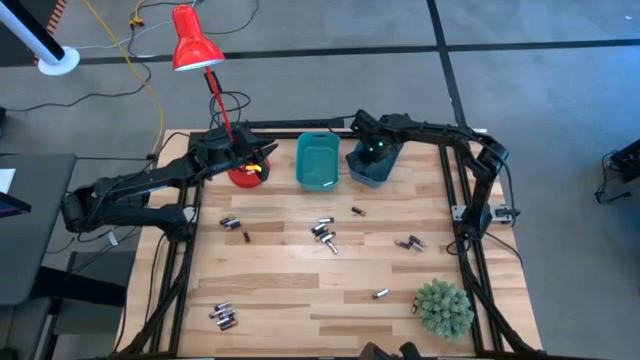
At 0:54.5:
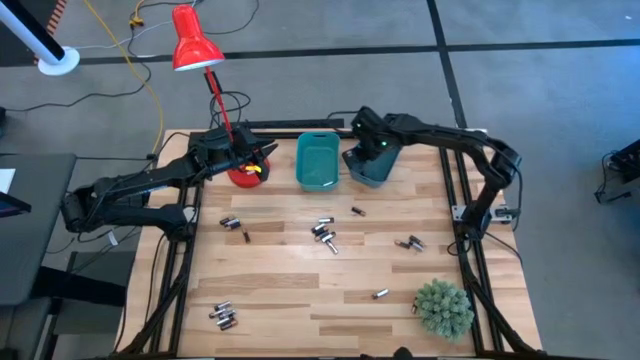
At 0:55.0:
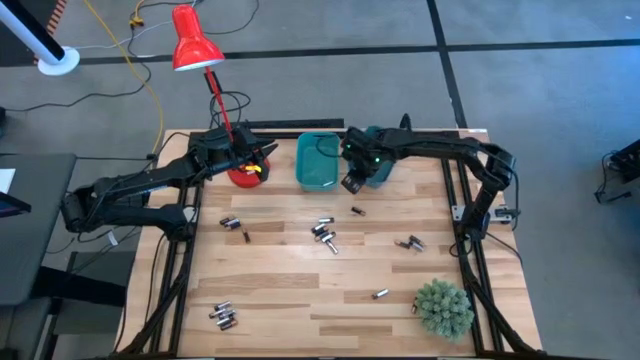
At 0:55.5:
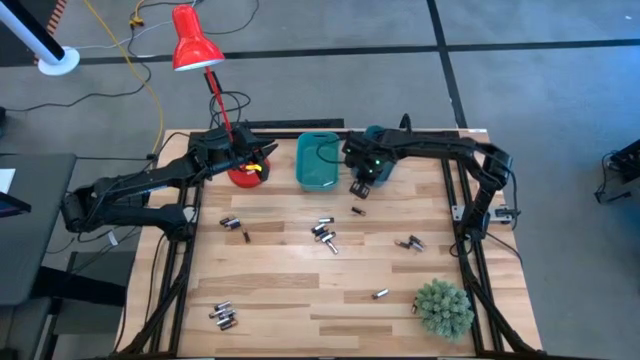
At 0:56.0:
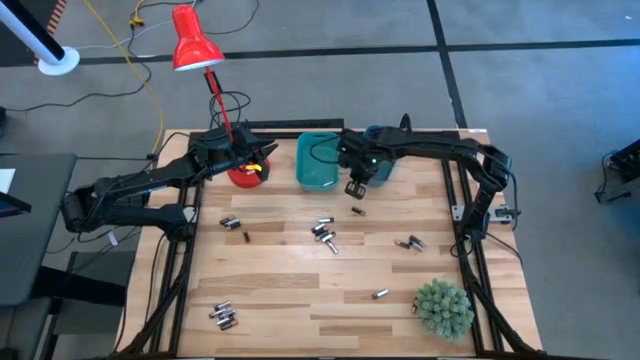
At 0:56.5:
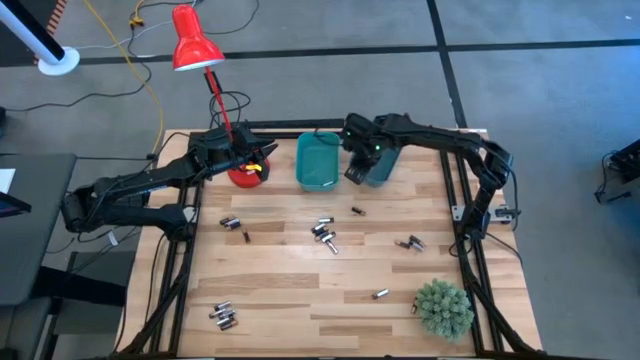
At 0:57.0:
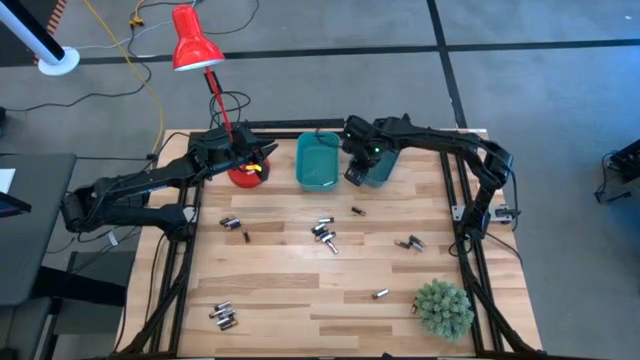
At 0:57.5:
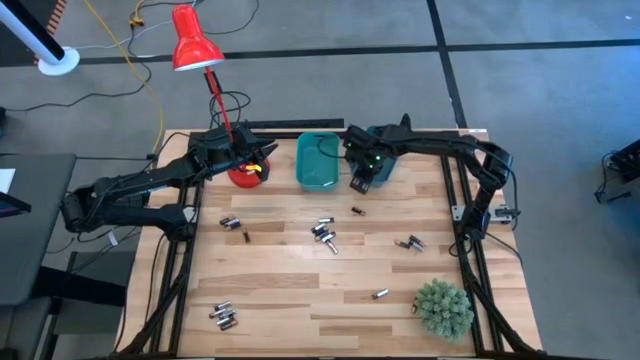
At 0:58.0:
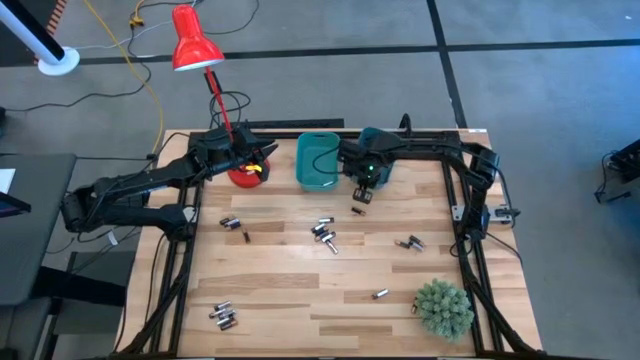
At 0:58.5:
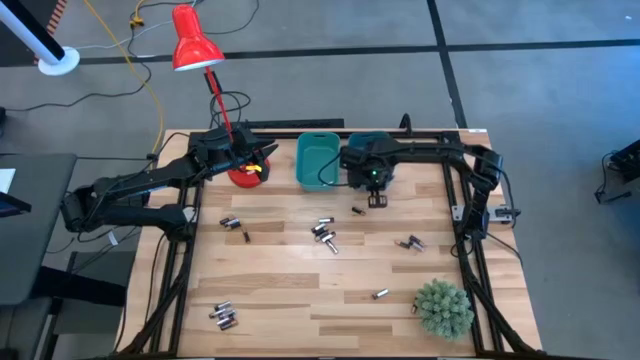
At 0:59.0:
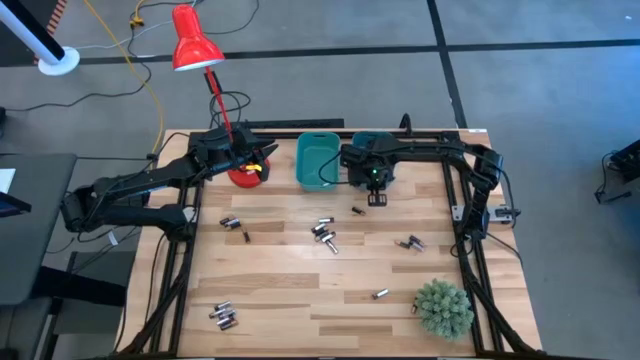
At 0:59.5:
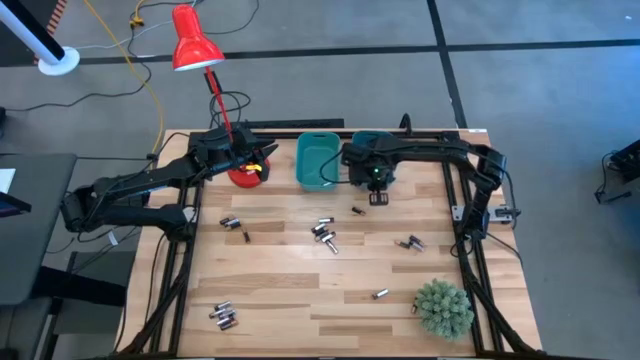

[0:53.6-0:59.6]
Task: Sort batteries
Adjust the blue bin on the table

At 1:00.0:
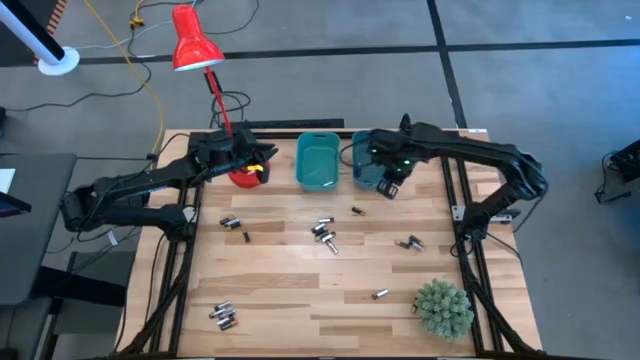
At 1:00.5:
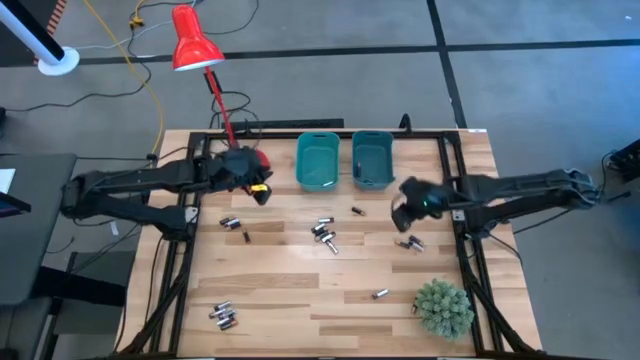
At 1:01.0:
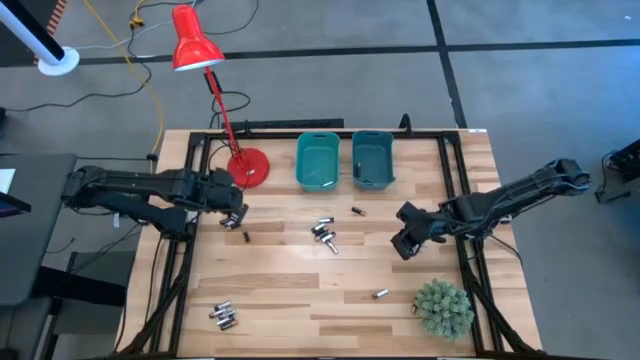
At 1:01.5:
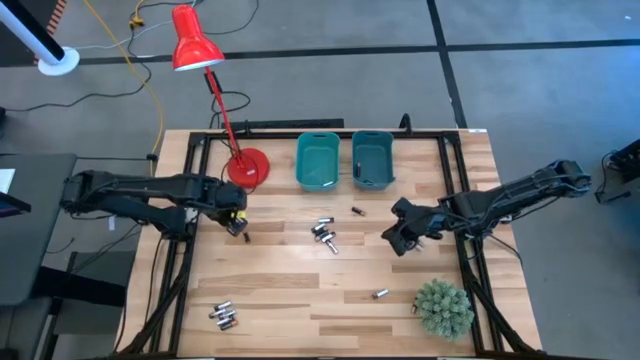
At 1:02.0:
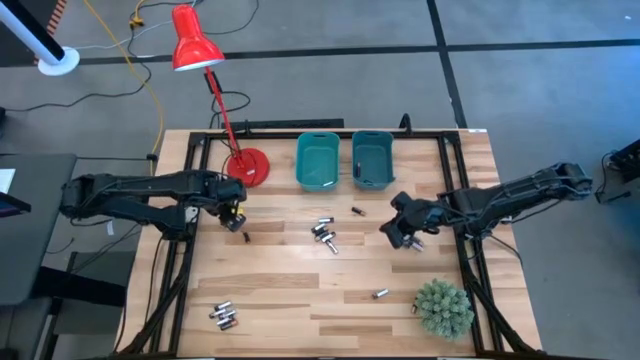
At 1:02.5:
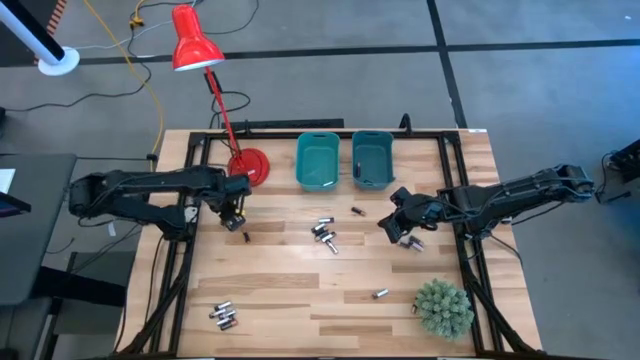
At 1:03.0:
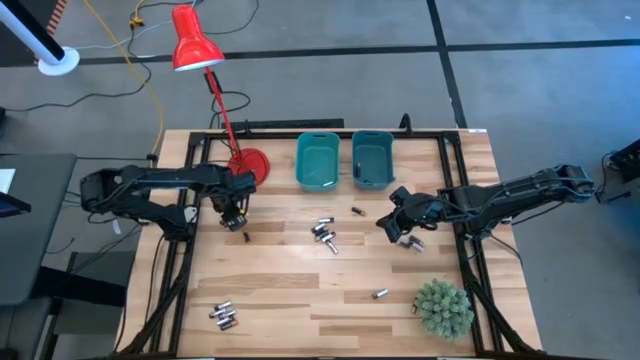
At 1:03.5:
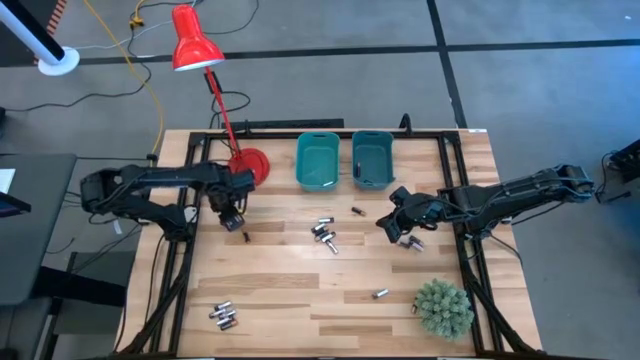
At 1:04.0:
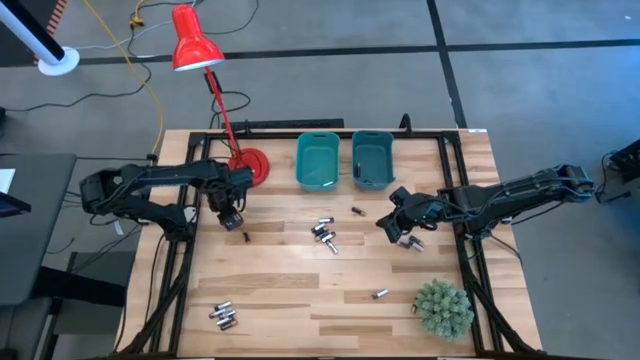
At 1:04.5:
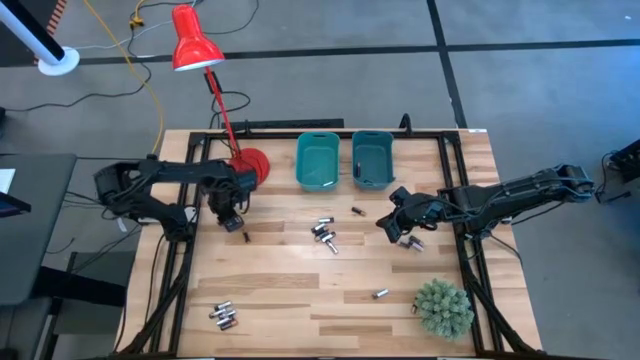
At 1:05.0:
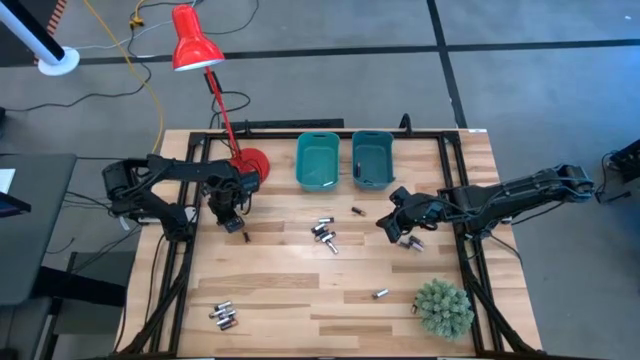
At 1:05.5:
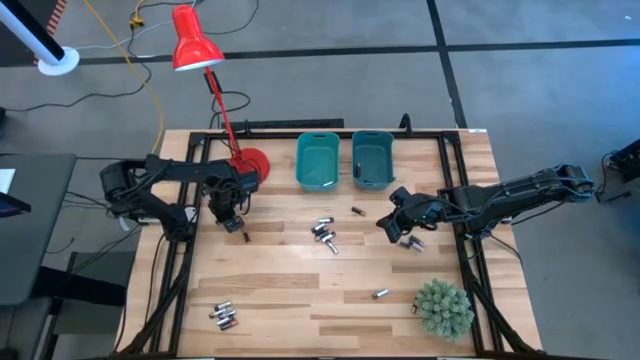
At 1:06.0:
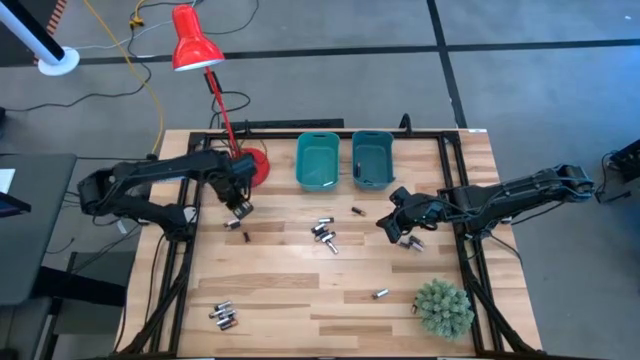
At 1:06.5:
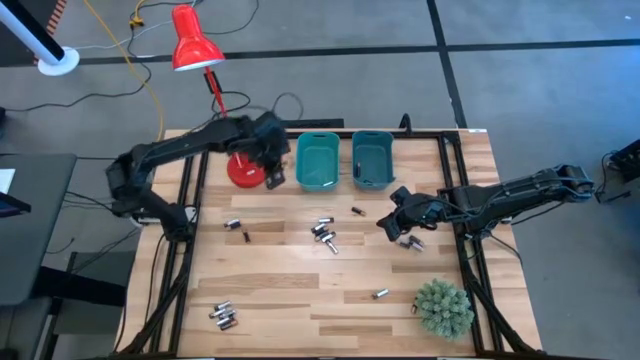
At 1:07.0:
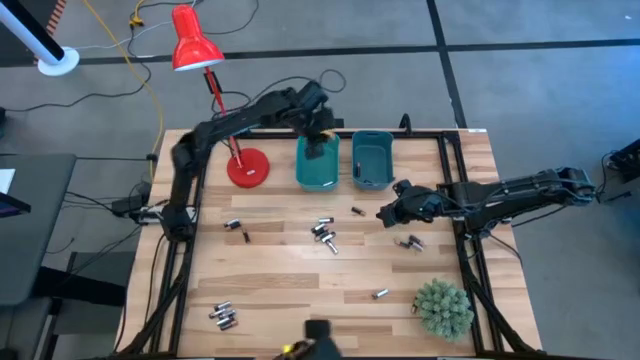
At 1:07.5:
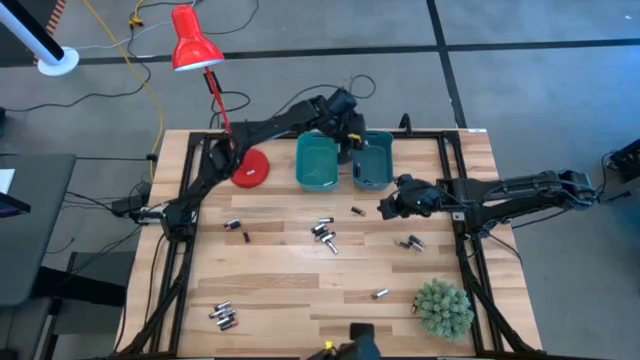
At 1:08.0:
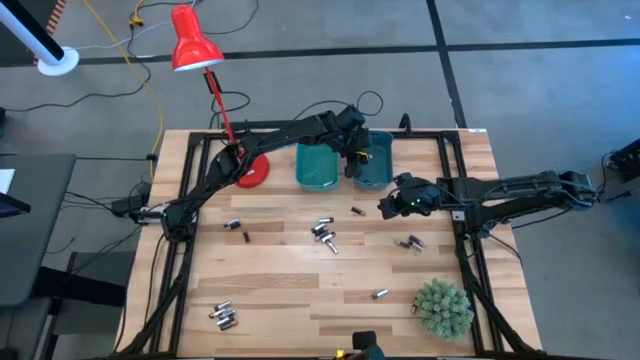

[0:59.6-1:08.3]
Put the black battery into the blue bin

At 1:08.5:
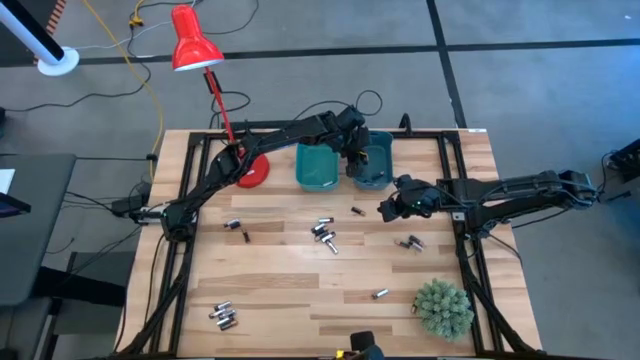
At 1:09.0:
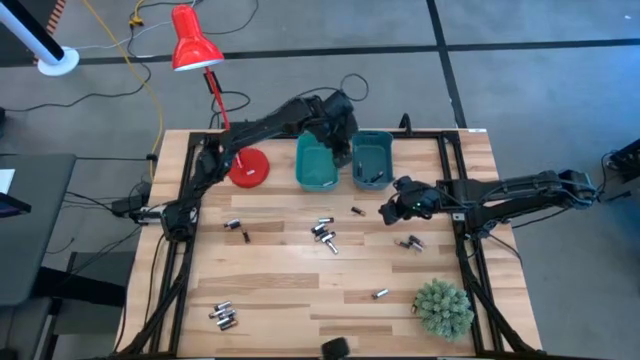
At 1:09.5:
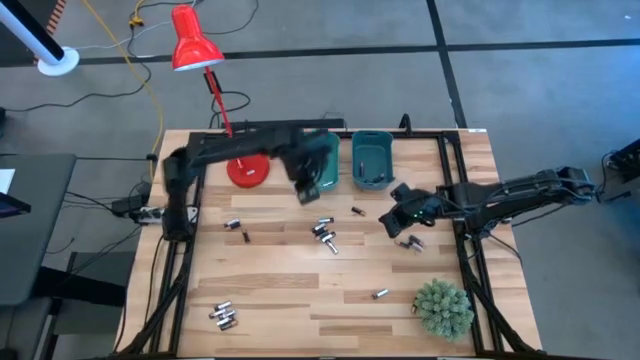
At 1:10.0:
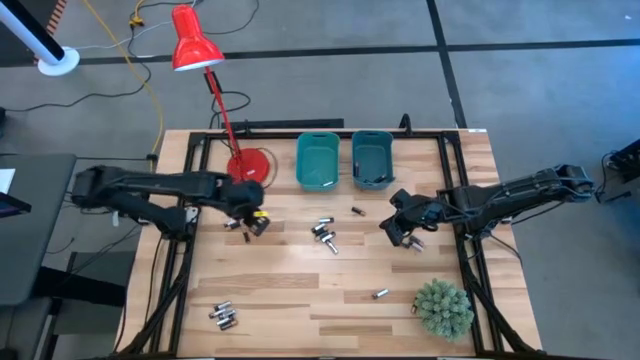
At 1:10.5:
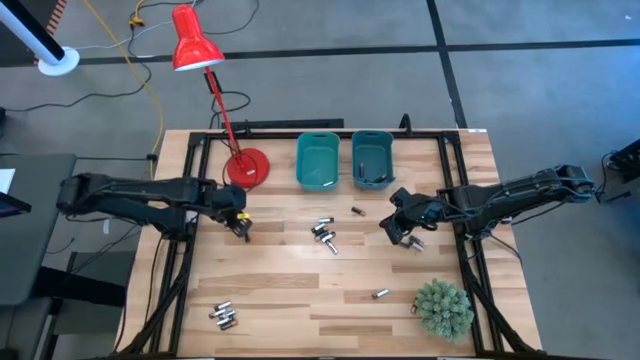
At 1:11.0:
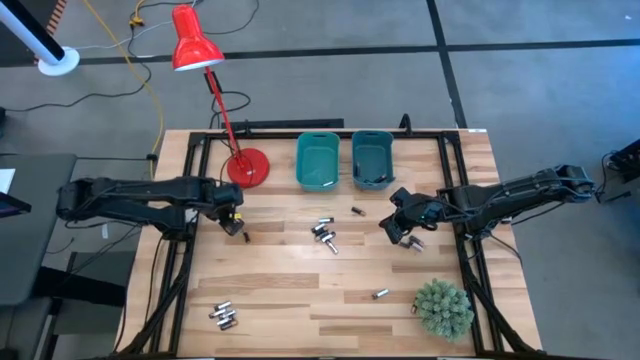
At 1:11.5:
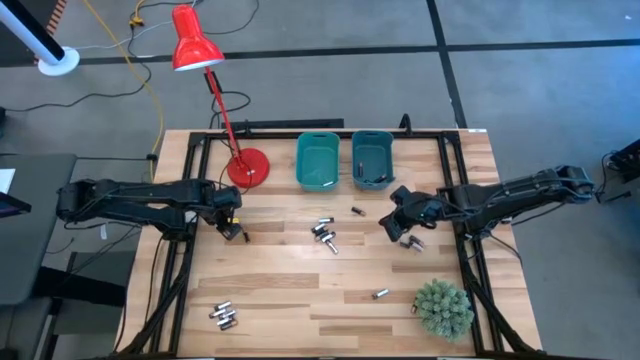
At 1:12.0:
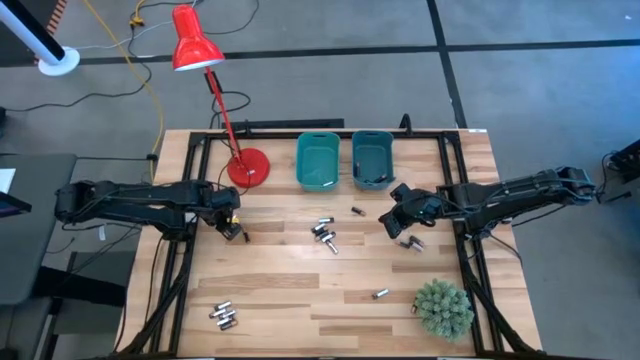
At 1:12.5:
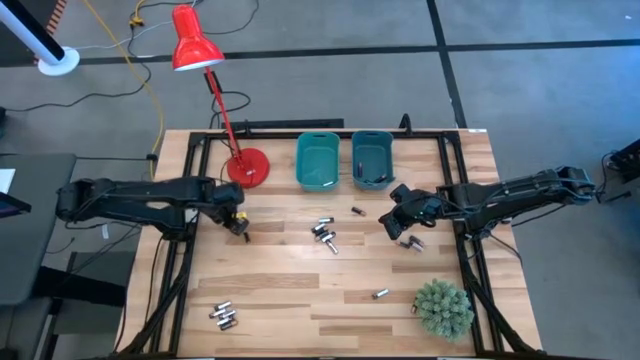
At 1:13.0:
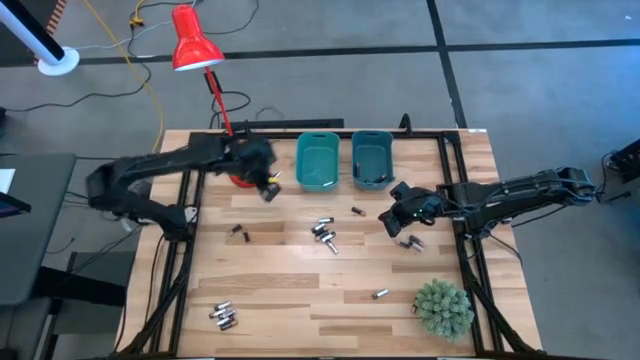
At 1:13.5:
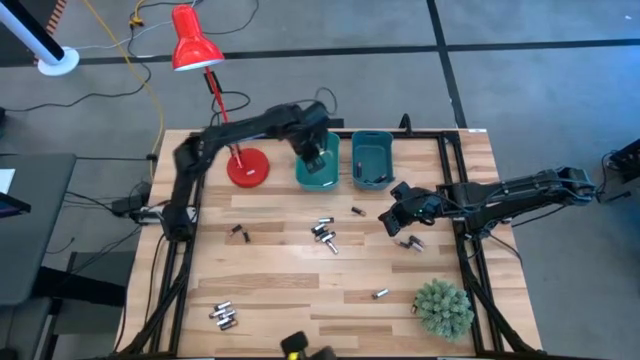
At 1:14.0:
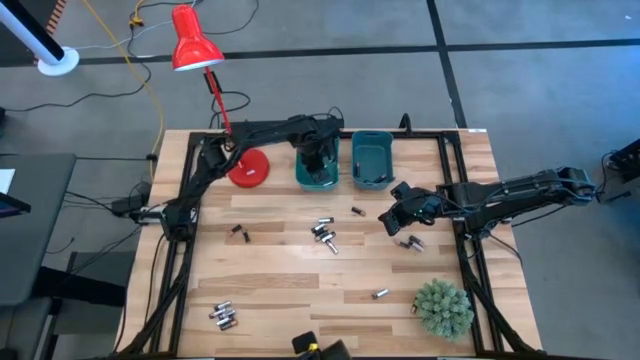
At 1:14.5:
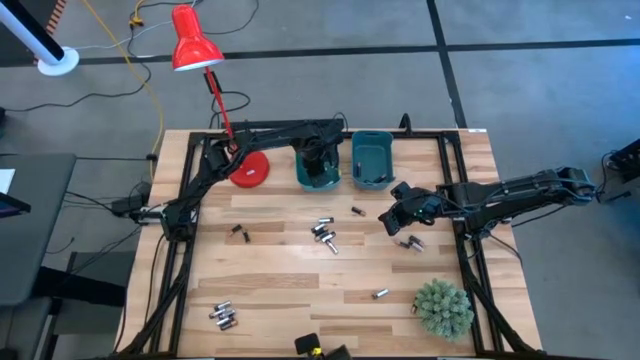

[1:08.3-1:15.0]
Put the silver battery into the green bin
